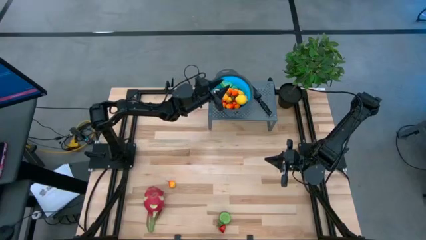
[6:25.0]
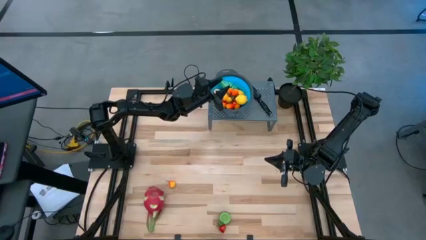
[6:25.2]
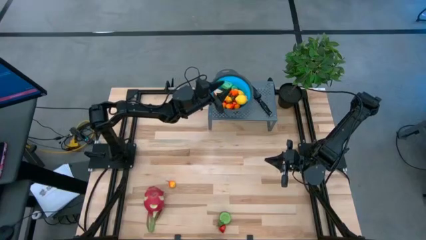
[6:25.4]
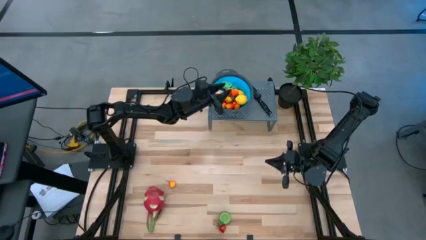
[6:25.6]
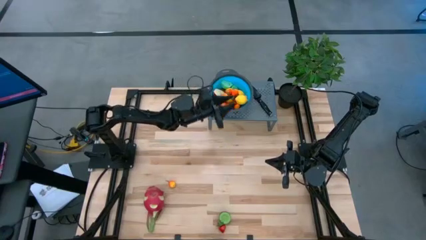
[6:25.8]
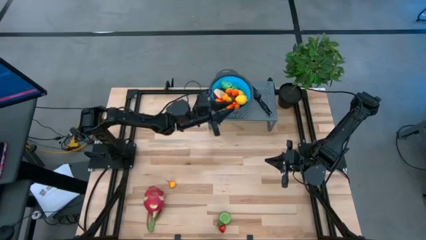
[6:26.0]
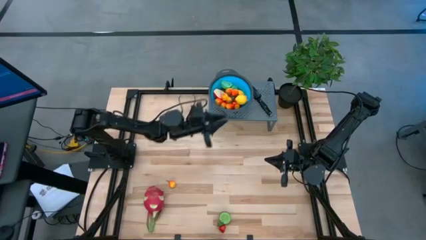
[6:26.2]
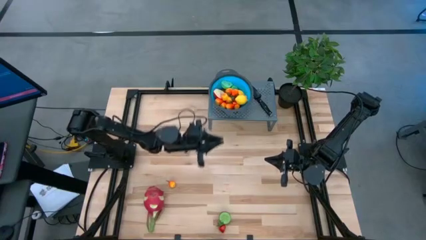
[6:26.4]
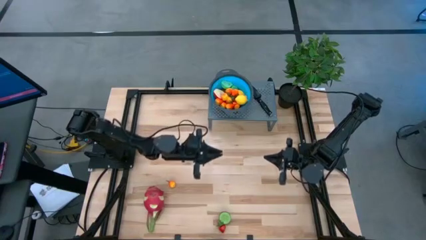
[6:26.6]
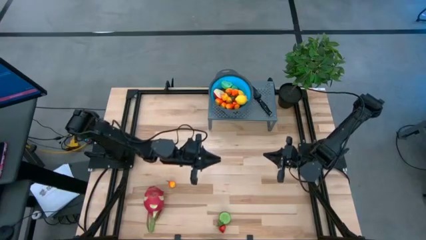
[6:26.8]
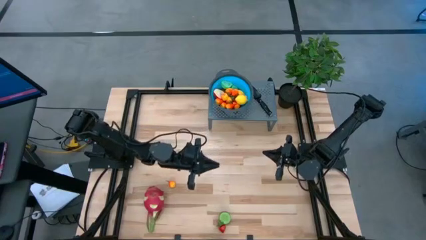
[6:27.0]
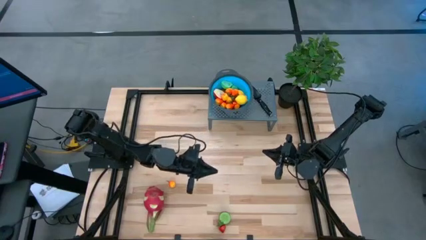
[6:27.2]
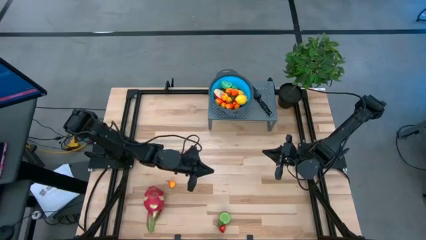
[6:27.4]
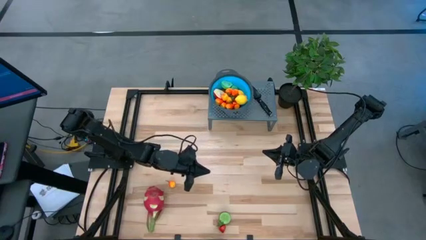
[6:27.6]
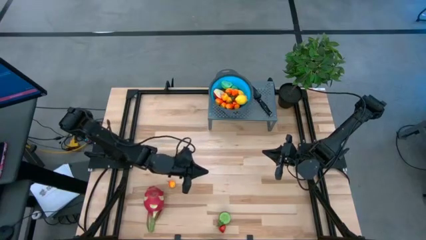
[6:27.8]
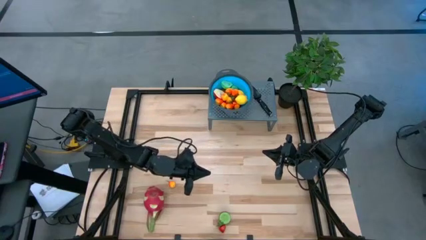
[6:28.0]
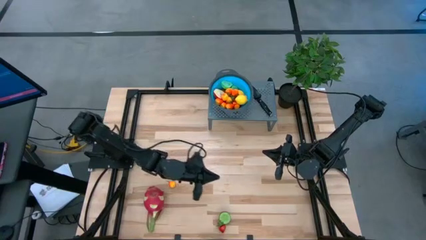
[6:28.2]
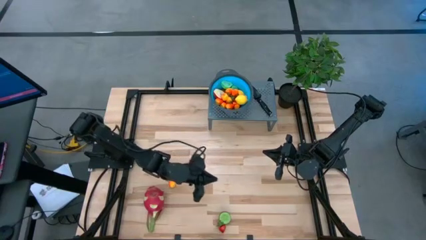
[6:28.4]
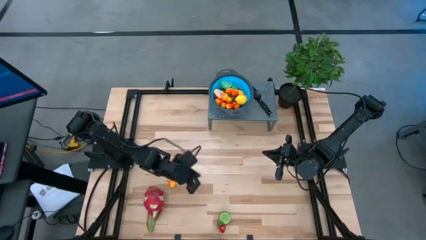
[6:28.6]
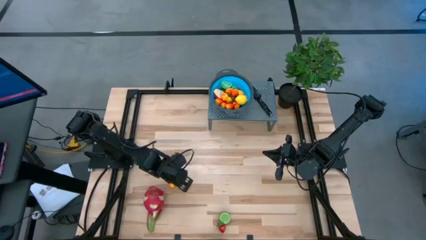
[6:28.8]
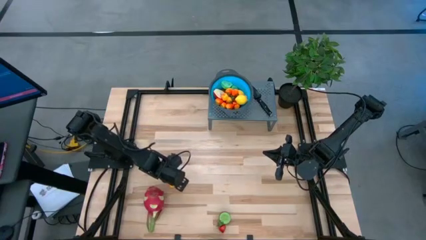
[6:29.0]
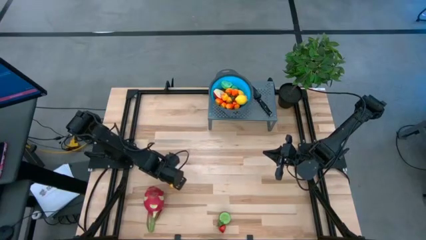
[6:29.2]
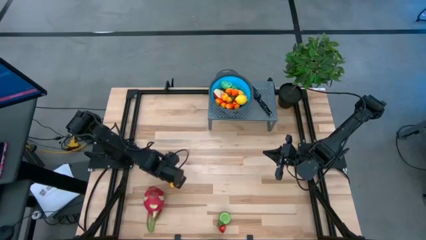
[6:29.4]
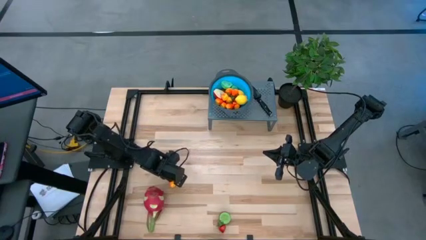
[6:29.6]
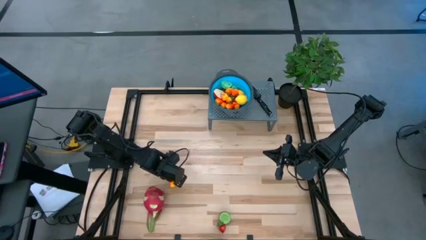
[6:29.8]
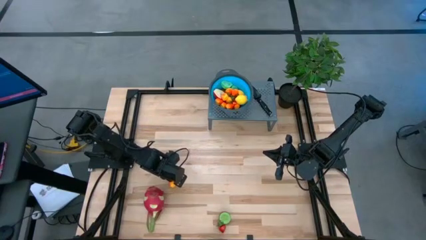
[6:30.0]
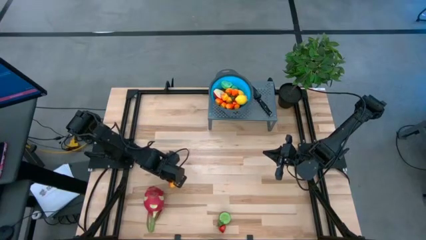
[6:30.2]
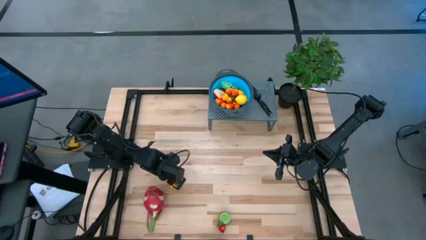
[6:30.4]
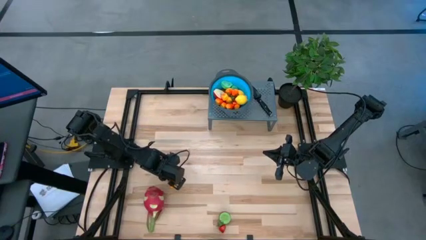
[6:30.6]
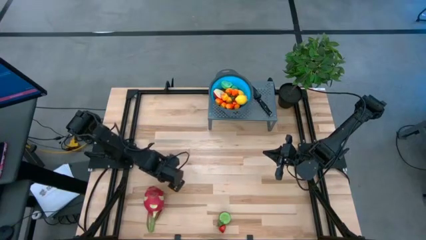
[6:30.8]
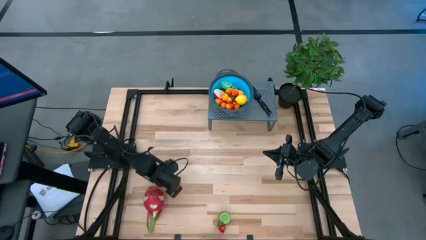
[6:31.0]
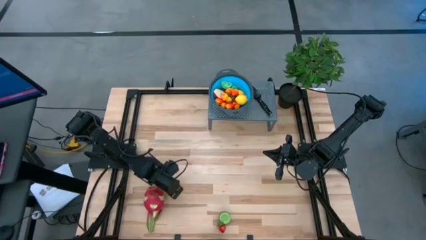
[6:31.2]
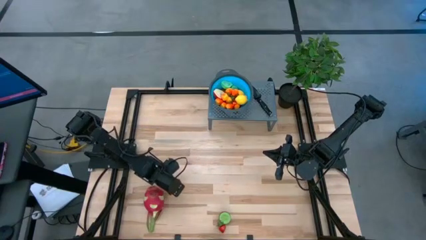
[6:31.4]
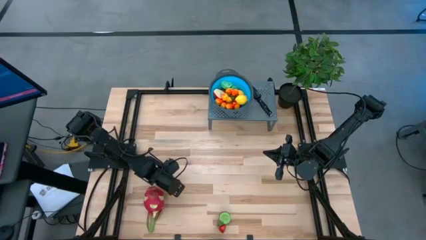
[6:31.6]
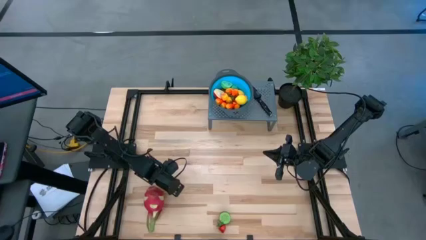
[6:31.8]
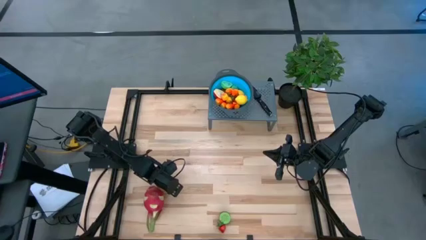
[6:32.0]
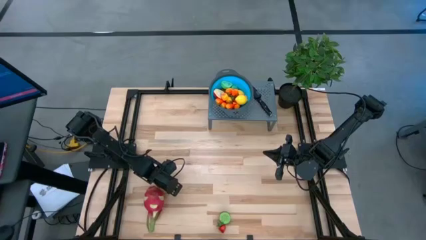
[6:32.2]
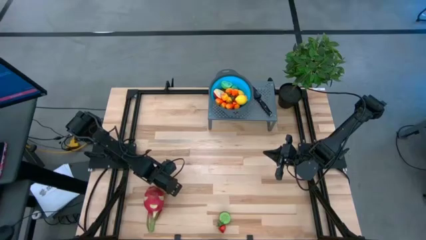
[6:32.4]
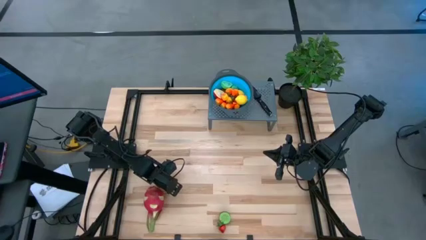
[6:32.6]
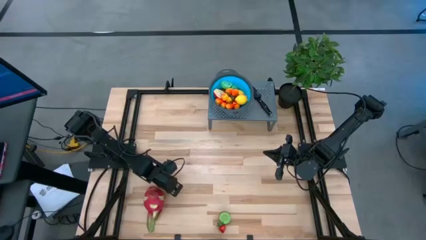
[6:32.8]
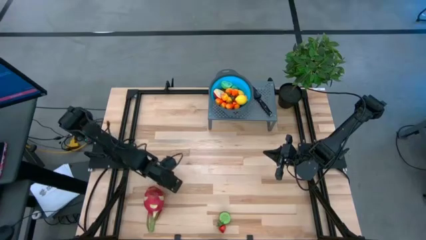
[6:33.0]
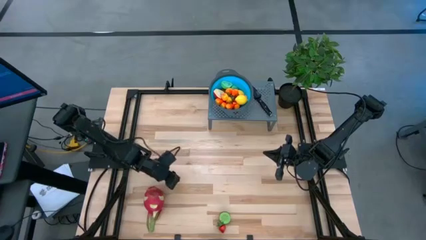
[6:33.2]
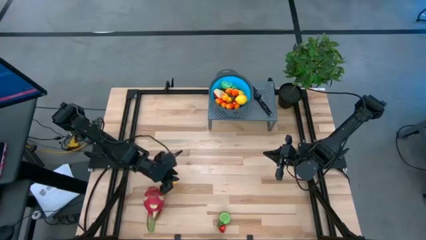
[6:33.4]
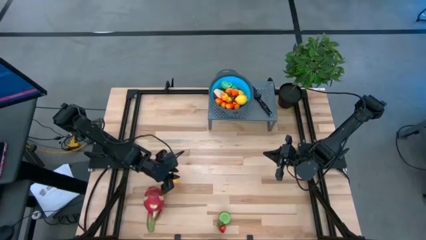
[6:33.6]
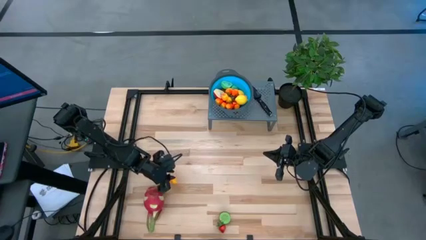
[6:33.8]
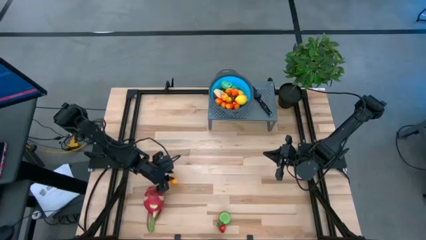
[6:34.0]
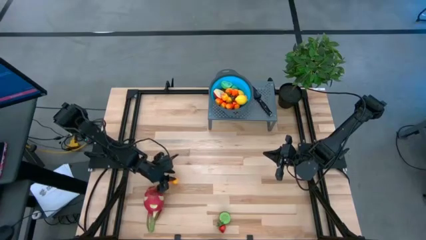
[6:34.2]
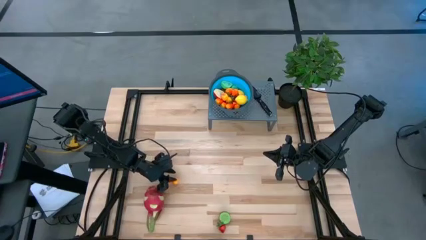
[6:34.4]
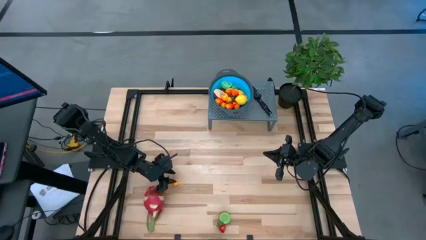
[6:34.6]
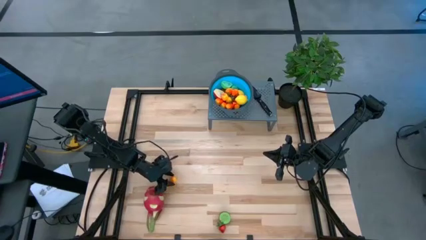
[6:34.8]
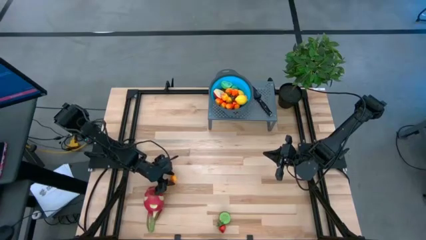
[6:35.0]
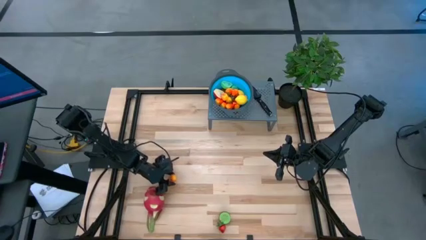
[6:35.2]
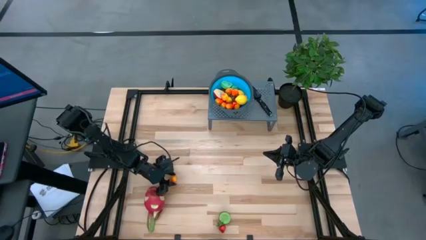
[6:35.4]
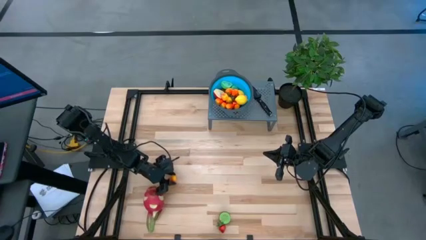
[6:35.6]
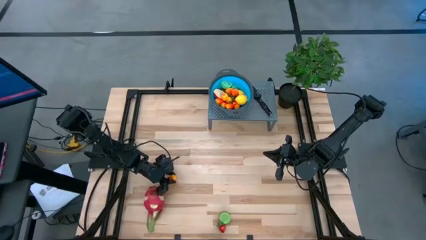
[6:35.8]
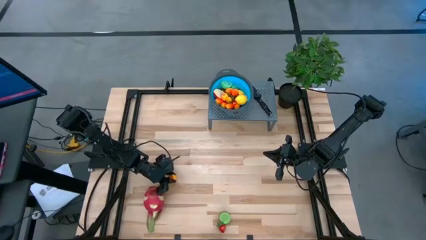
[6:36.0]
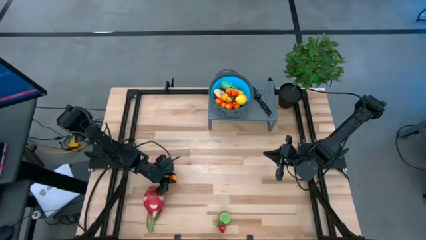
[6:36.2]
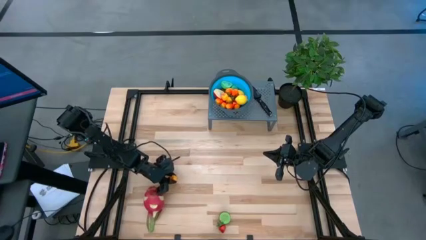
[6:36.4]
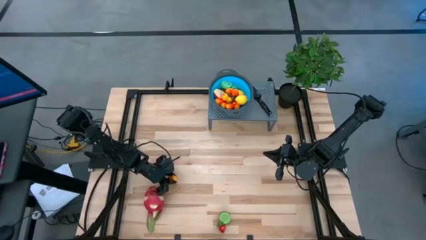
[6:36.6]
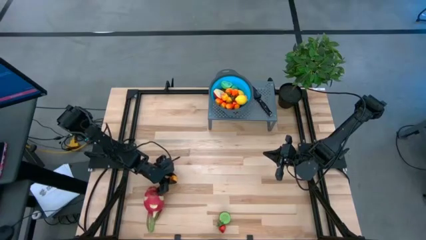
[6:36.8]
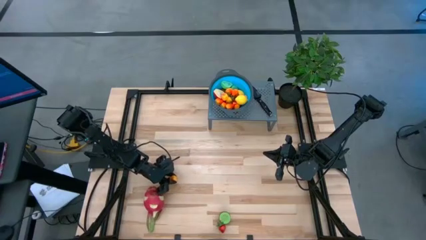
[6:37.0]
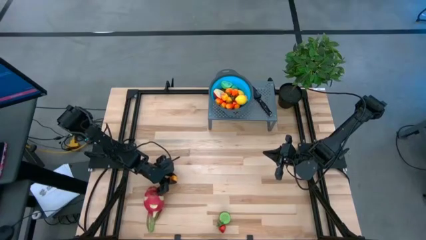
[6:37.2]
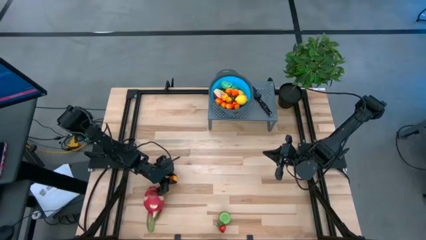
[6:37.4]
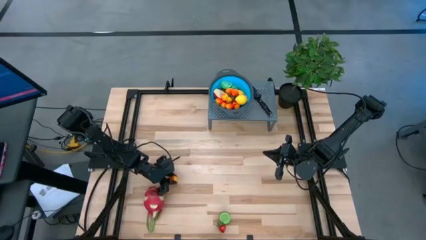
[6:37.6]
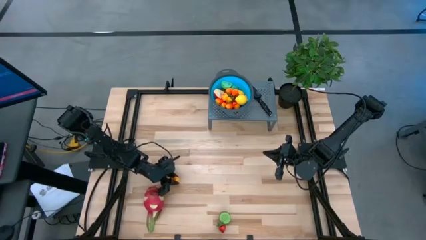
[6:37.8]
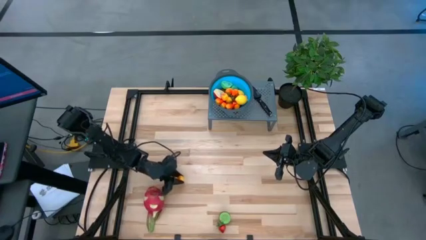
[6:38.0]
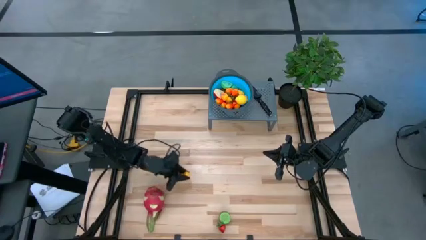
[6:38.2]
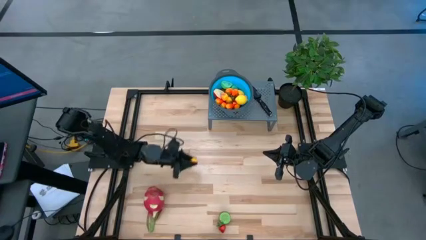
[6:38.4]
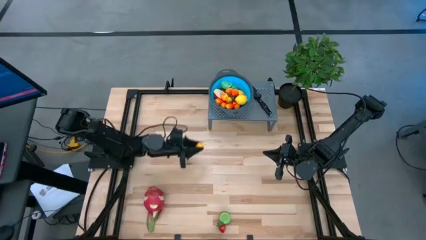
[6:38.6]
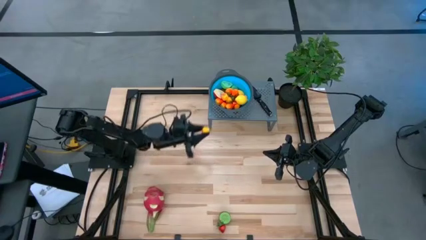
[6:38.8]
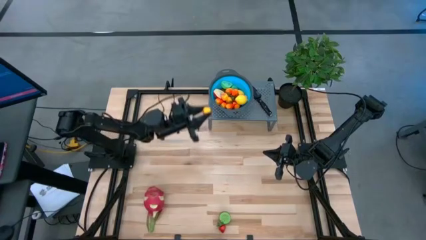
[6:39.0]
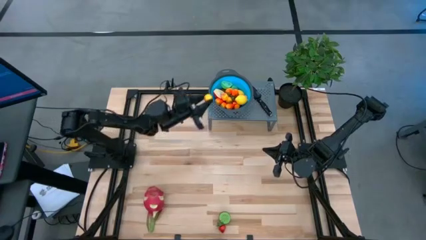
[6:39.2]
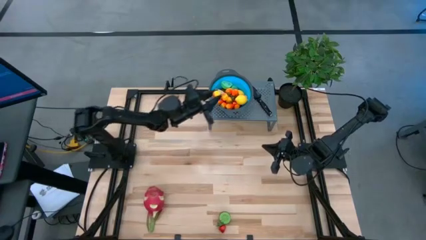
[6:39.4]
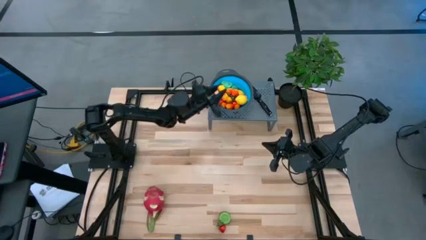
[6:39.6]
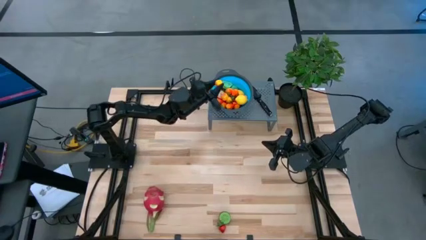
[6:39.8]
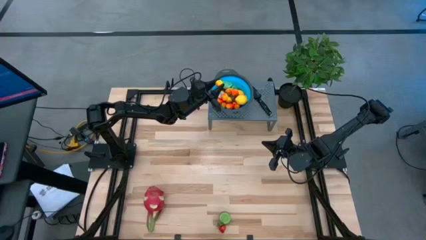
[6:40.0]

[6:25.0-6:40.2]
Task: Pick & Place Fruit
Put the yellow pear into the strainer bowl

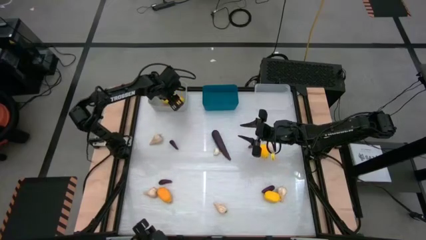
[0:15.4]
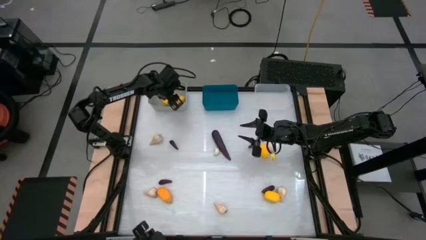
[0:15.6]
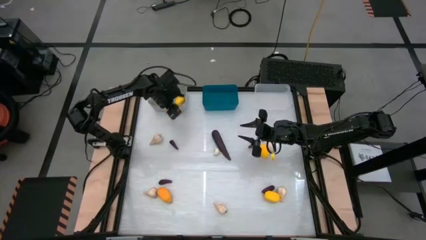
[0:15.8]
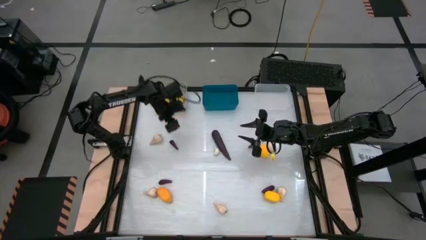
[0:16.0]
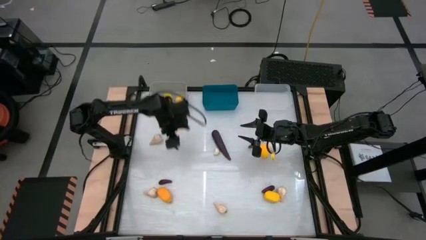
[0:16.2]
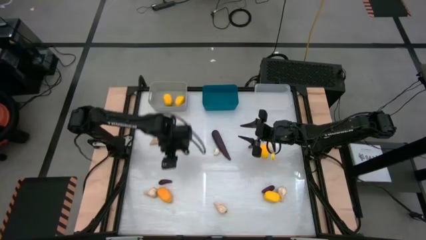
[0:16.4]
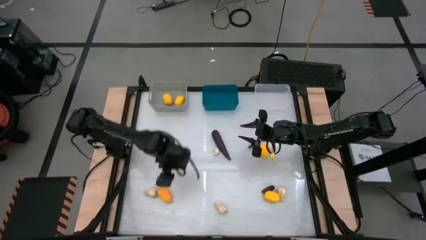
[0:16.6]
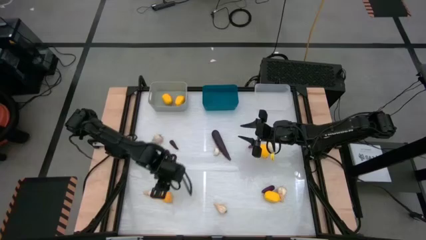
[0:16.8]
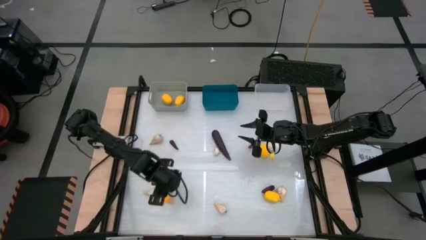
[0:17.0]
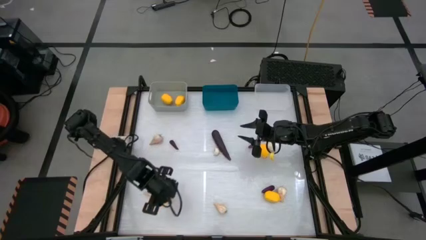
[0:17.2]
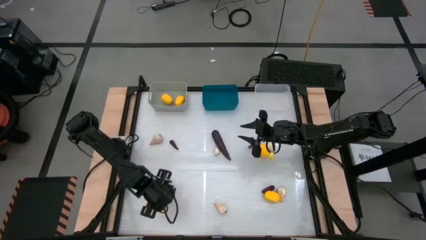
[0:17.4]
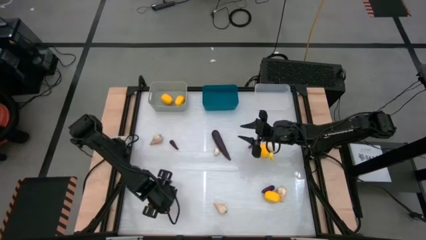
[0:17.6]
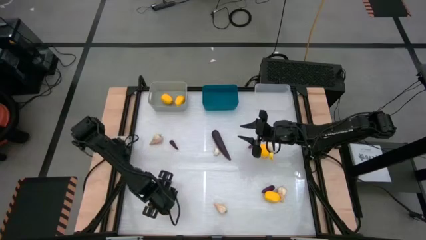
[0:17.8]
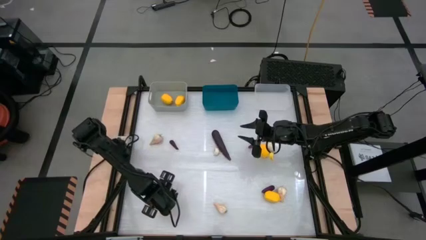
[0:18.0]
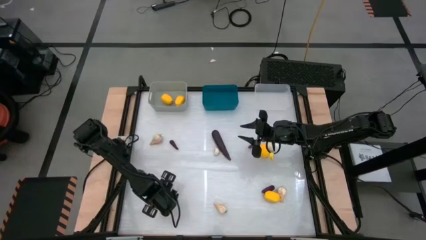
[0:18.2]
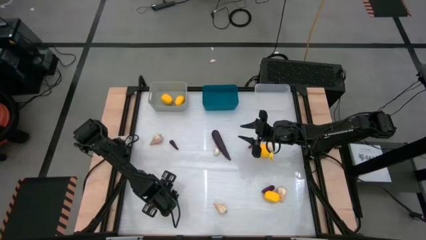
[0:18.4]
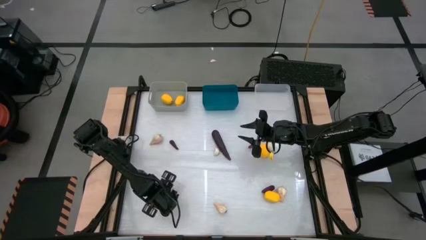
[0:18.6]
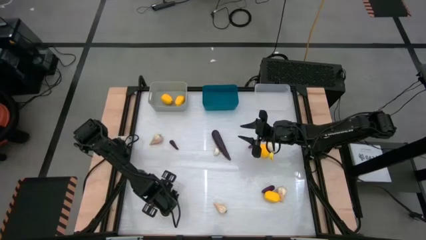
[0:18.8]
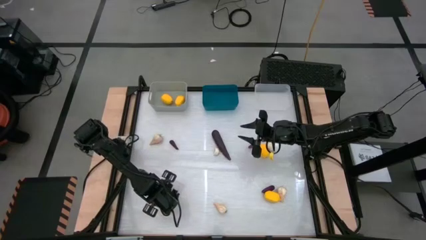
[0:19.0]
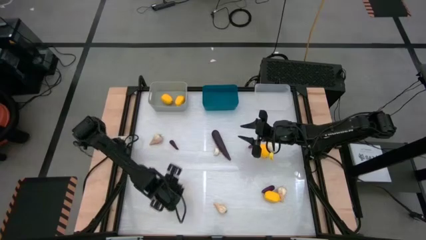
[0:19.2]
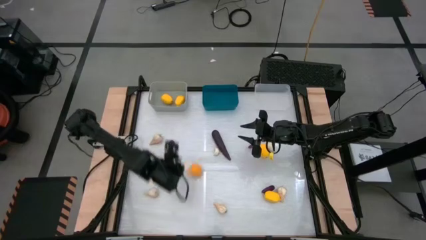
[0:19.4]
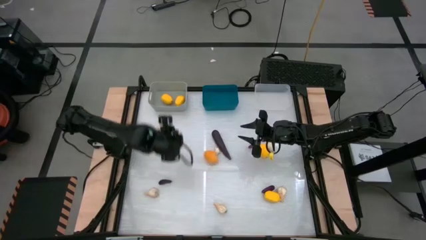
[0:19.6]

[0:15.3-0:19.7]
Task: Sort produce into baskets
Put the bottom left lemon into the gray bin
